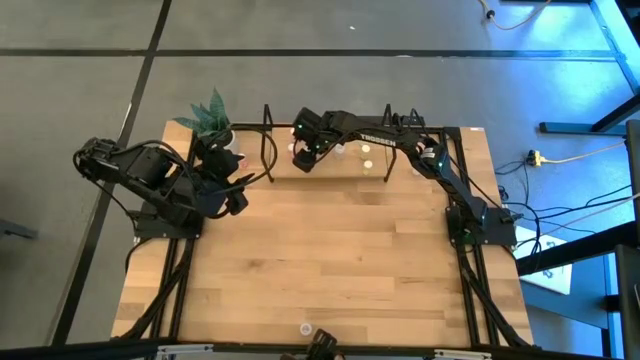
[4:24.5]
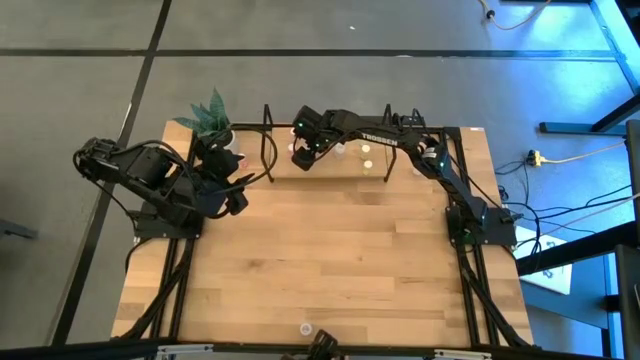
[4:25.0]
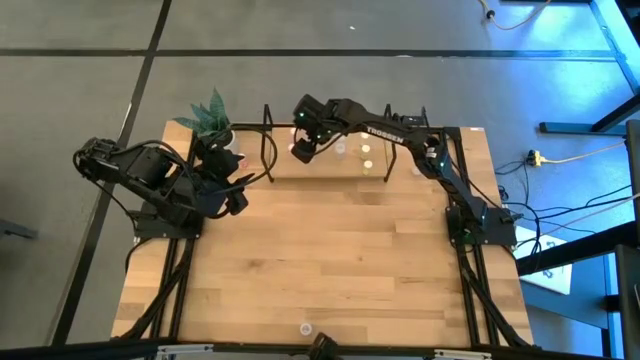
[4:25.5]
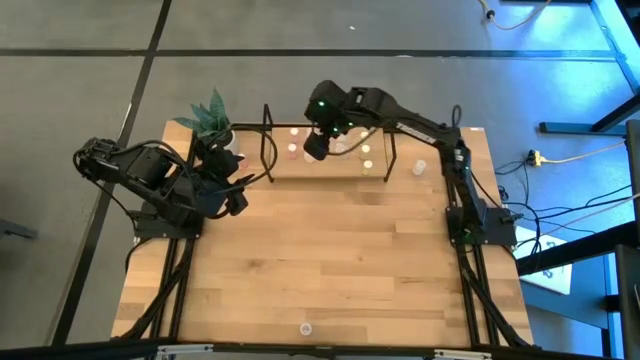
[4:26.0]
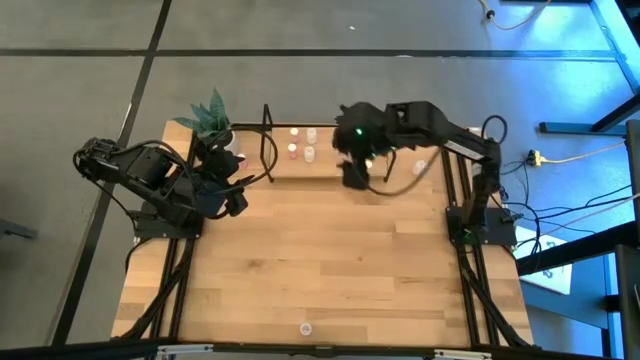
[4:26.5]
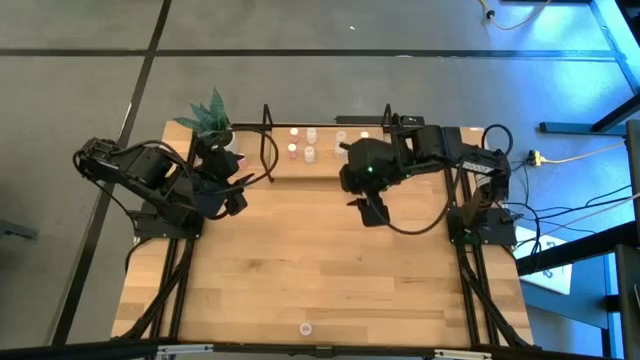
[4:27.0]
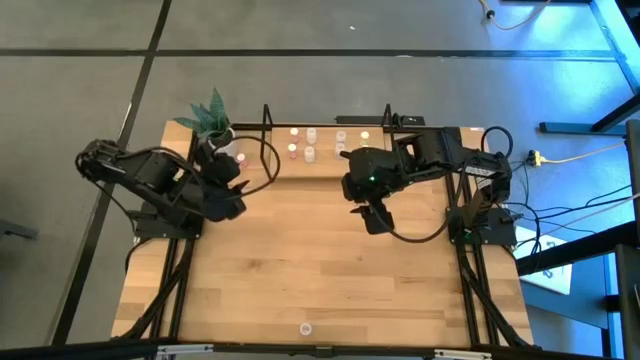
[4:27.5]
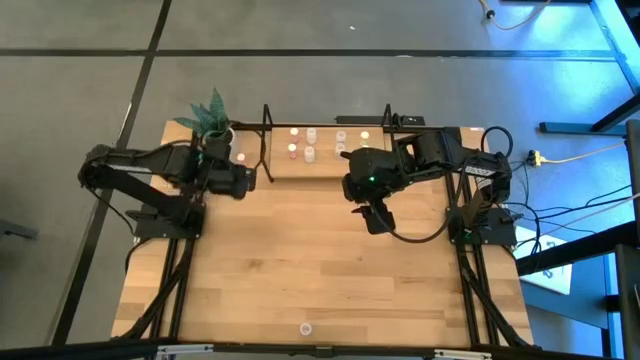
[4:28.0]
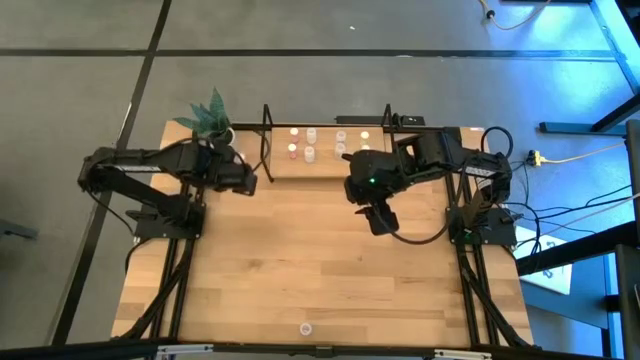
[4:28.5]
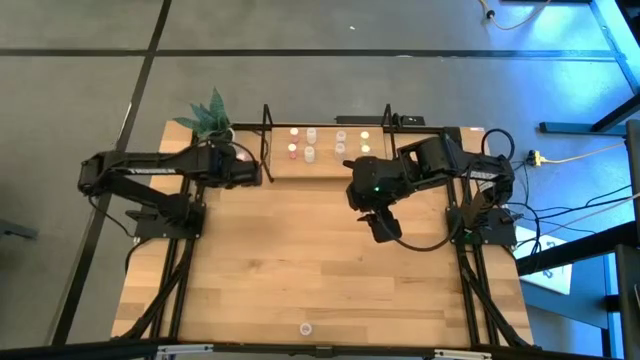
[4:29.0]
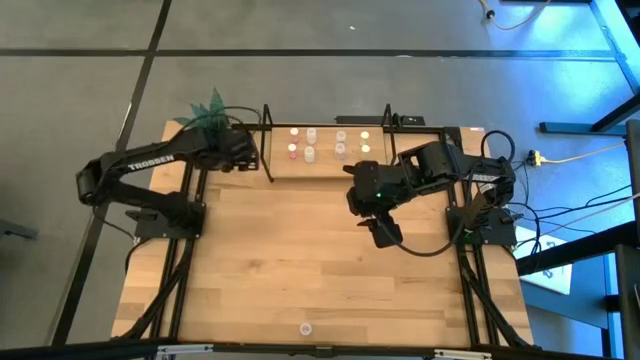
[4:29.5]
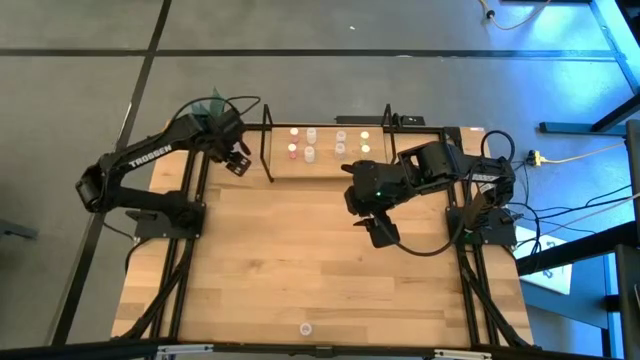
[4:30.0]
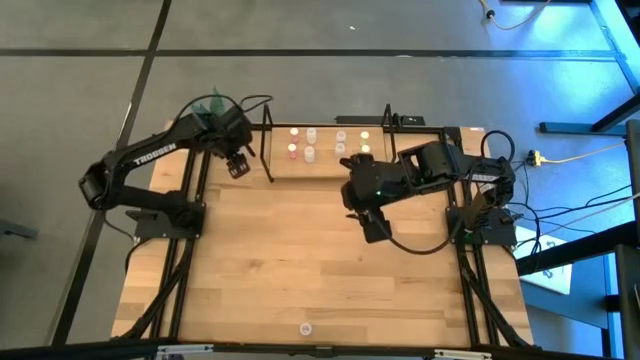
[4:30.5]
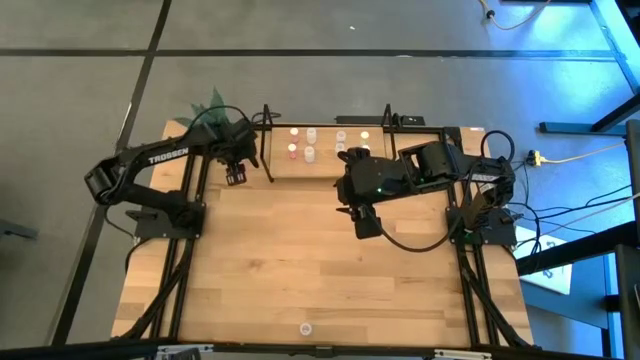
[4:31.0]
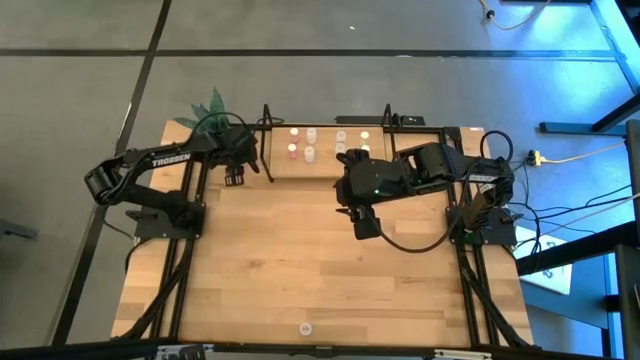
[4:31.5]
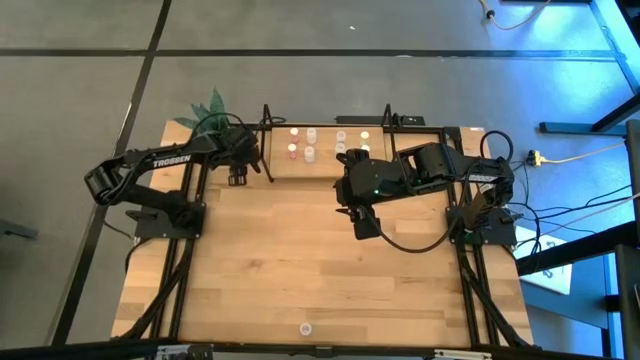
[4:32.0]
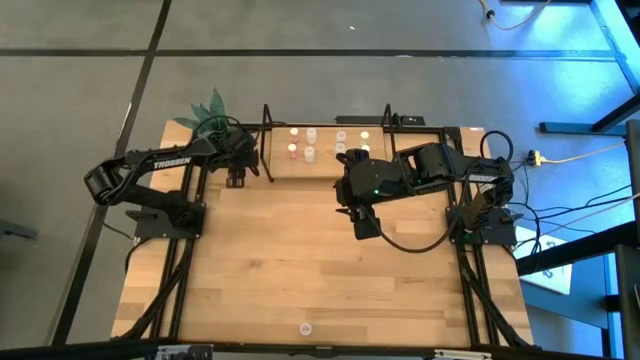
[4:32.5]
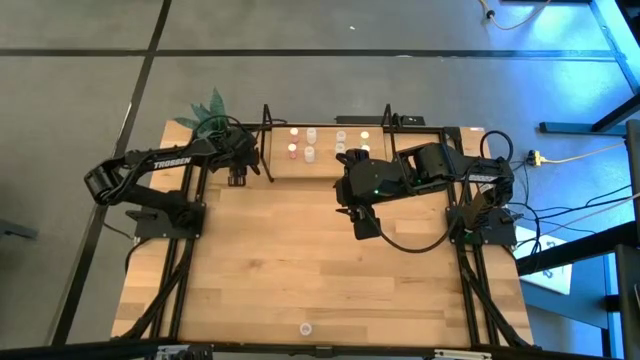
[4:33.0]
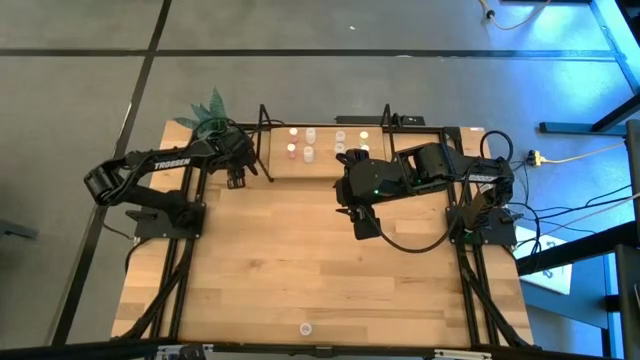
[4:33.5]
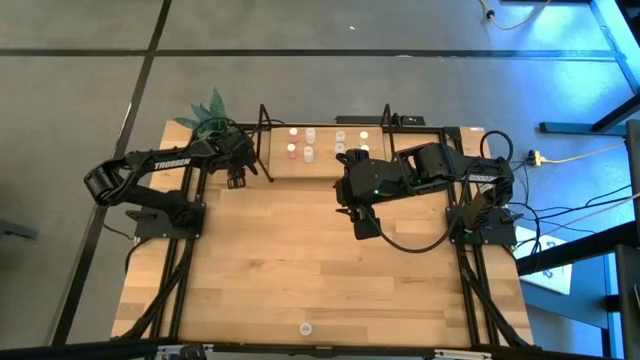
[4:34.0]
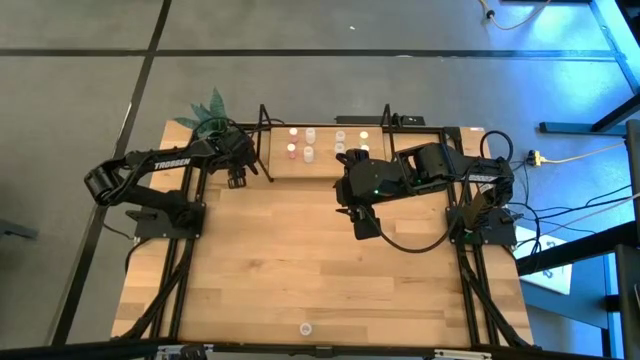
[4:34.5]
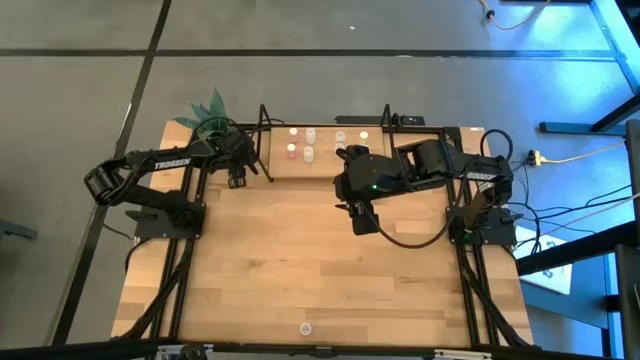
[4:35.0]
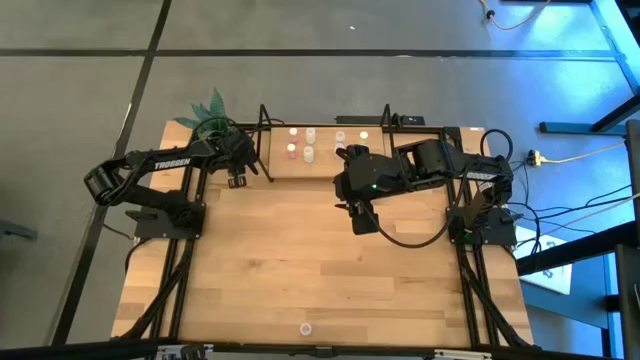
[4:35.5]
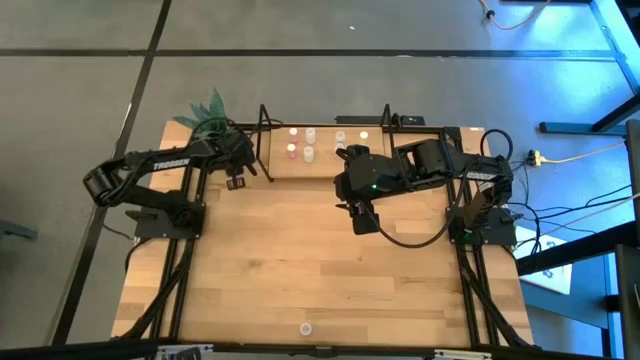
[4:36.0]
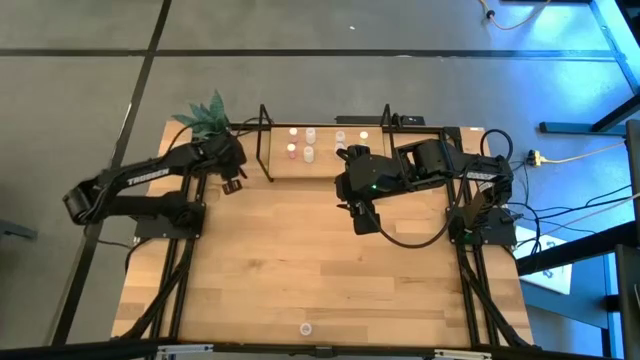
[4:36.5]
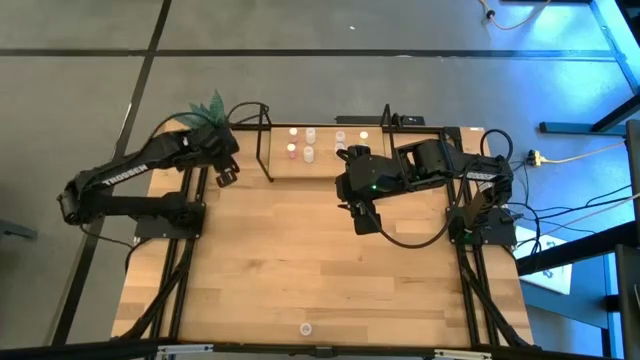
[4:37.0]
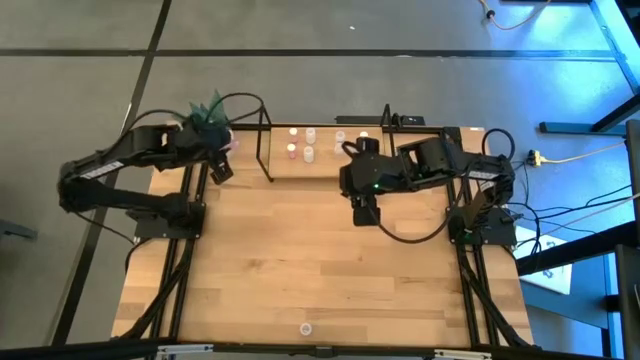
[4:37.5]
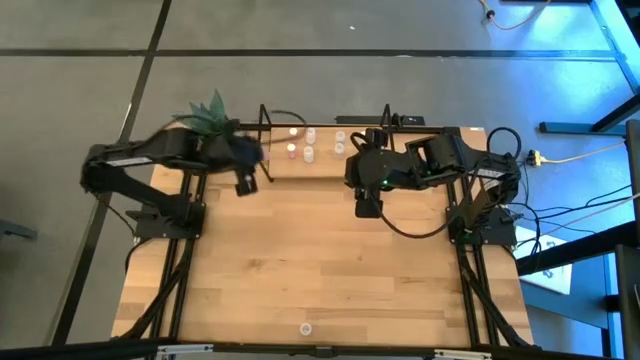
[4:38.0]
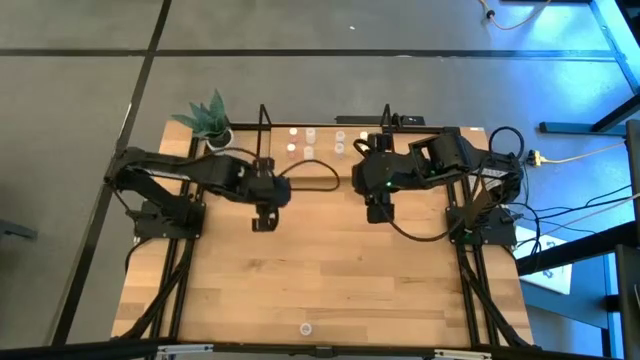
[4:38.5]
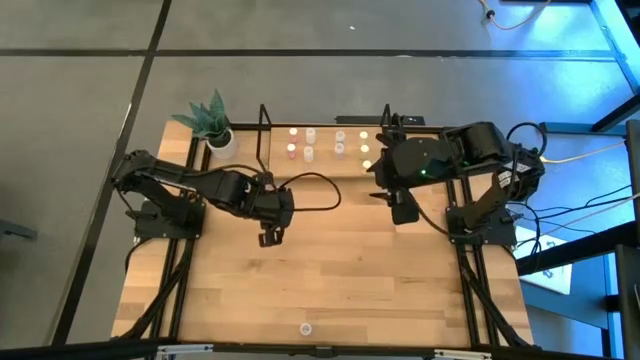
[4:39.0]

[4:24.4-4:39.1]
Task: Pick and place medicine bottles onto shelf by color
Put the pink pill bottle on the shelf aligned with the other pink pill bottles

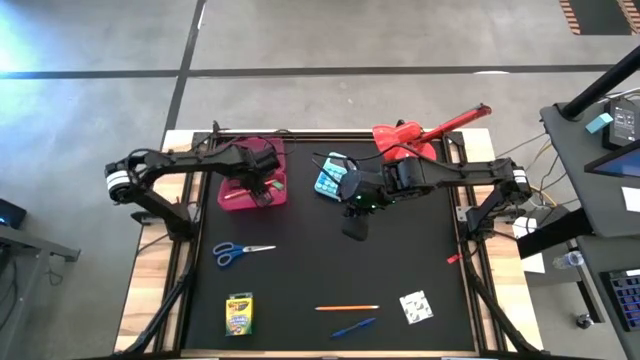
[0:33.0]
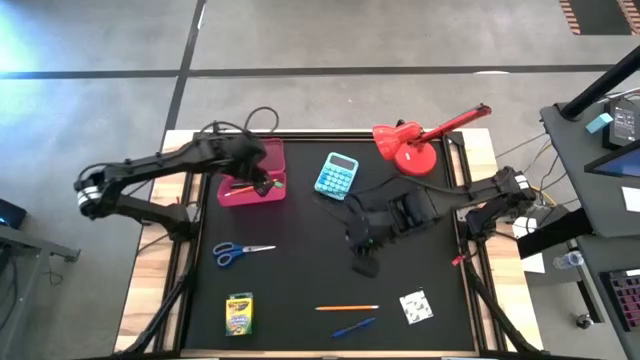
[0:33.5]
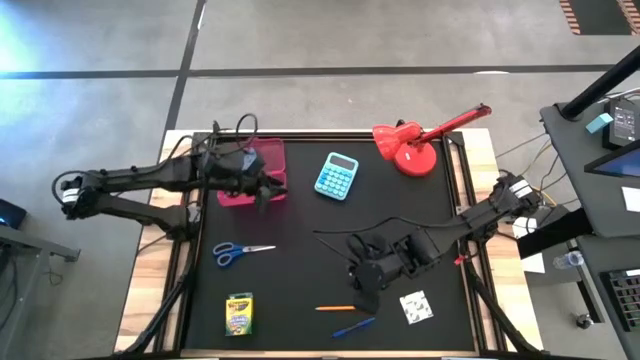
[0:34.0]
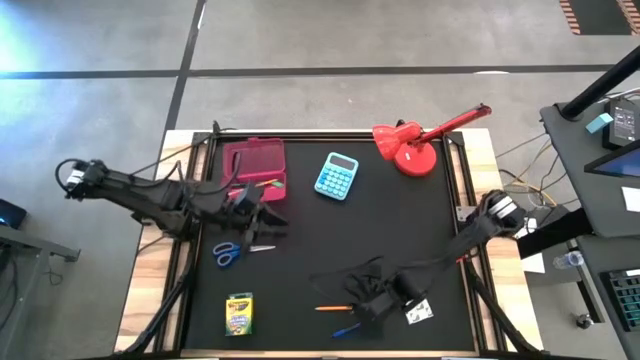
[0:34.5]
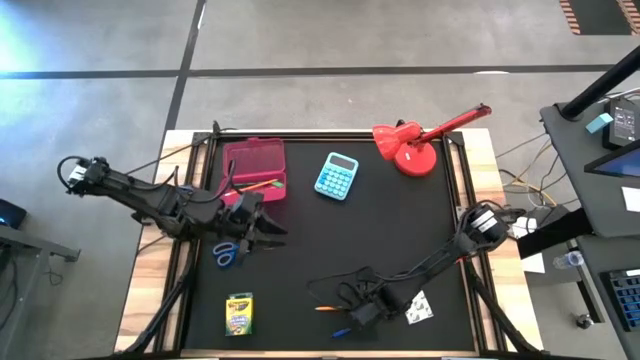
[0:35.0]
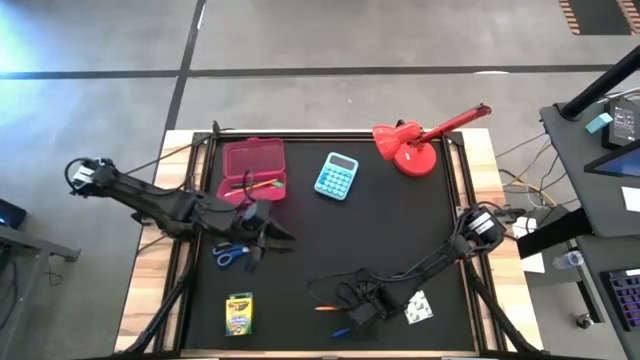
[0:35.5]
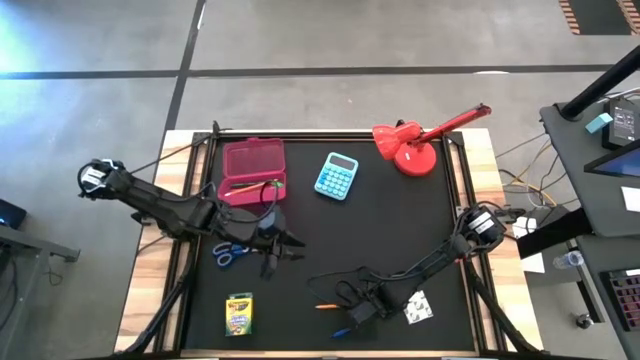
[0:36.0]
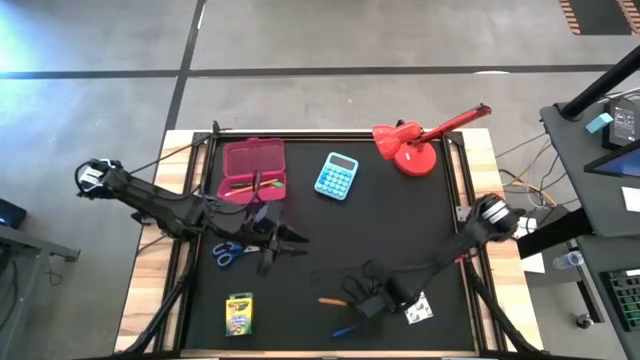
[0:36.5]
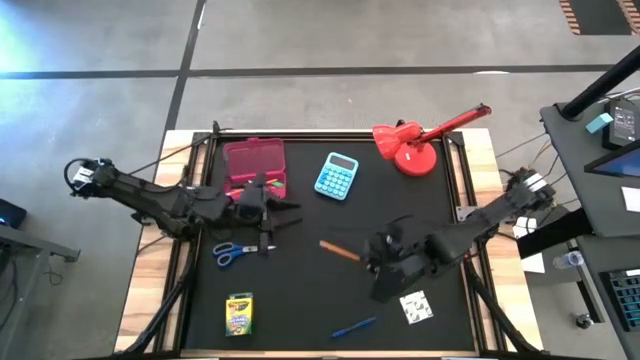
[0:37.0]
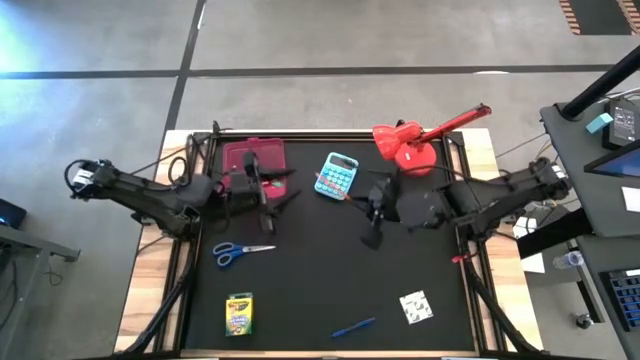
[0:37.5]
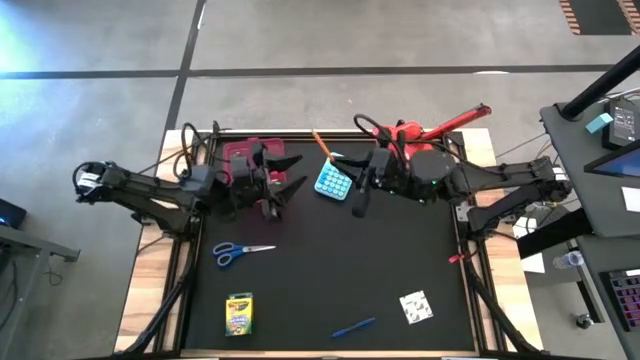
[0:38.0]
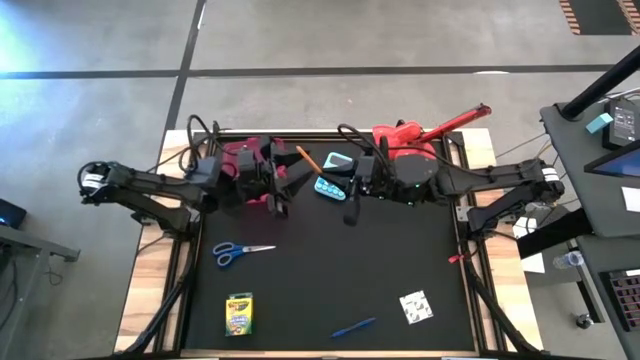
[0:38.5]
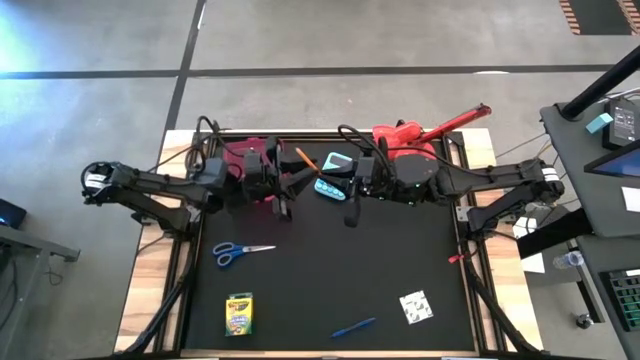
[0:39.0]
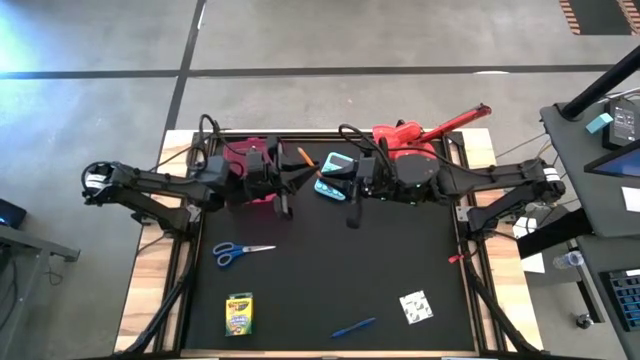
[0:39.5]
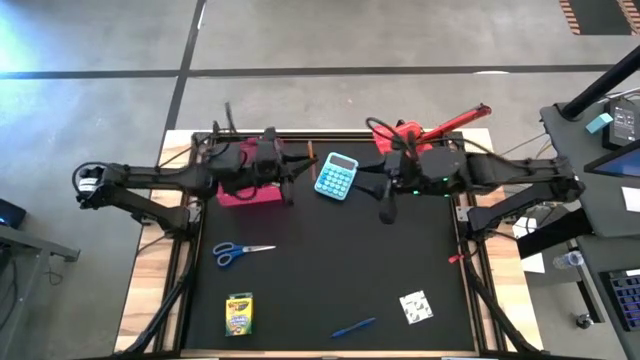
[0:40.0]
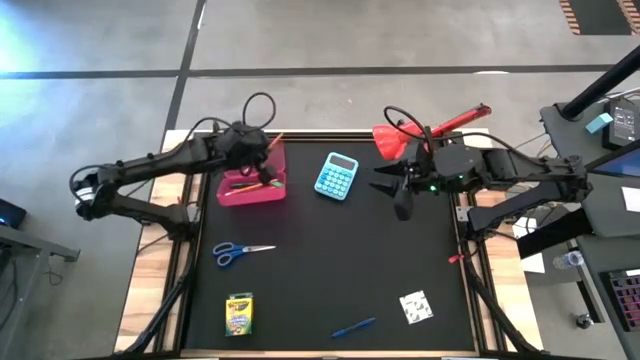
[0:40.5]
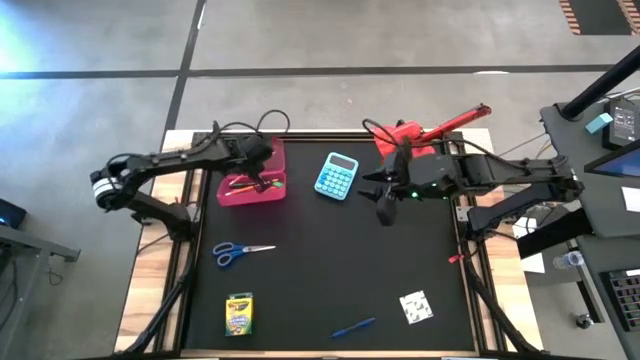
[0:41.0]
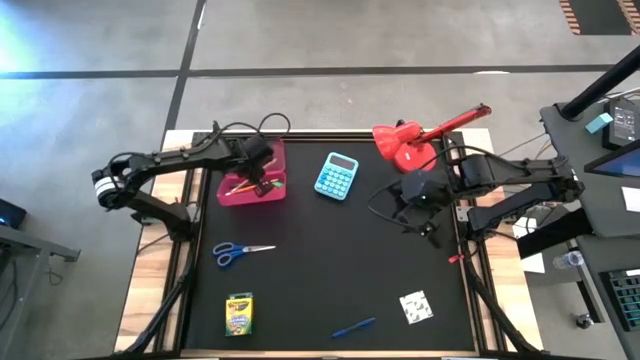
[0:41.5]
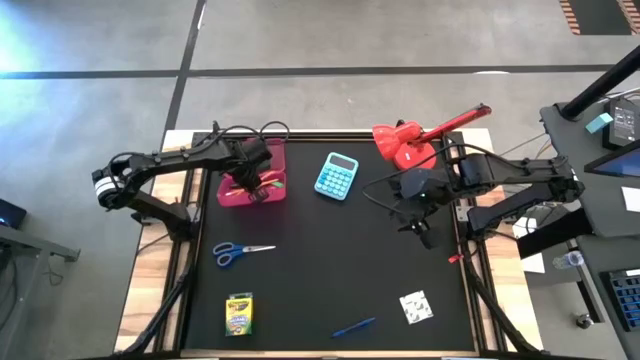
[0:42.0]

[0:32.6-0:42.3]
Task: Pack school essentials
Put the orange pencil into the red supply box
